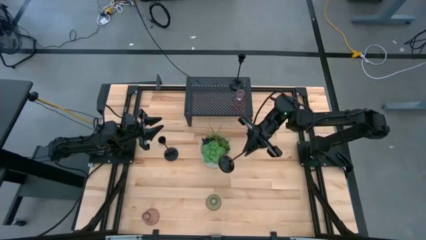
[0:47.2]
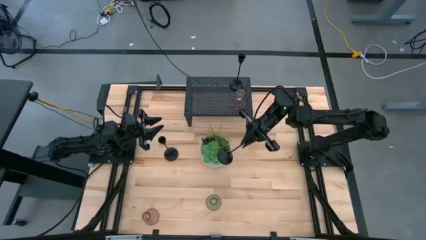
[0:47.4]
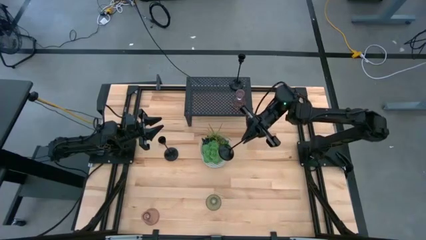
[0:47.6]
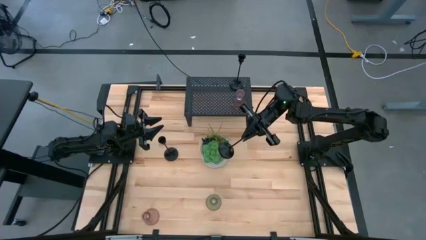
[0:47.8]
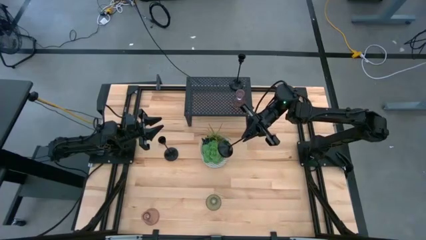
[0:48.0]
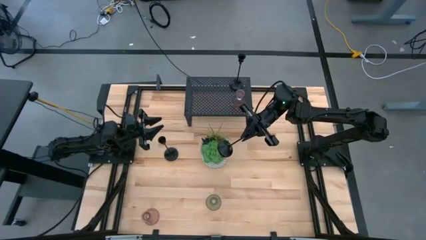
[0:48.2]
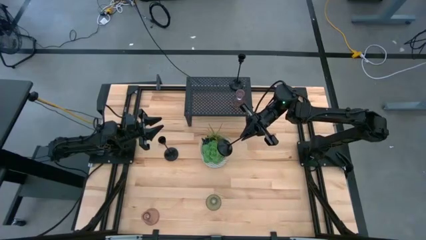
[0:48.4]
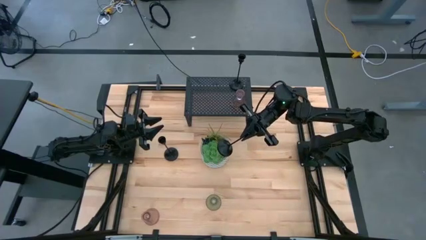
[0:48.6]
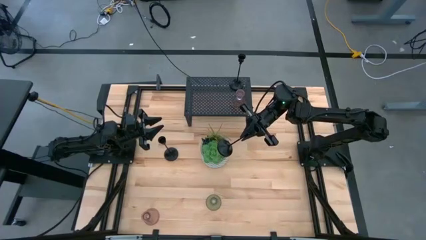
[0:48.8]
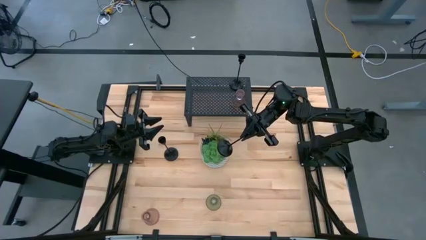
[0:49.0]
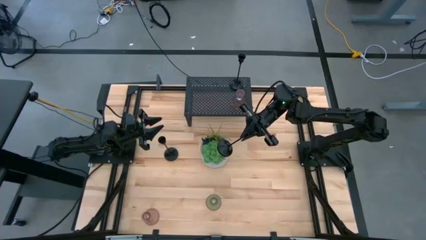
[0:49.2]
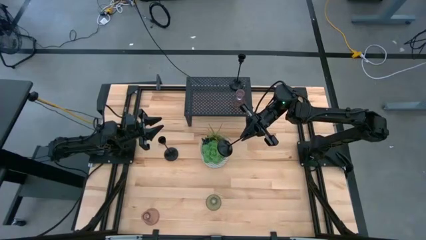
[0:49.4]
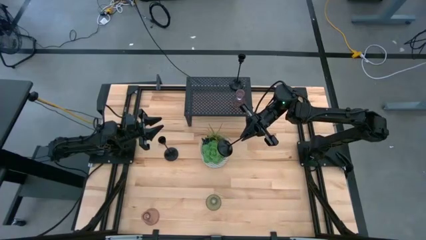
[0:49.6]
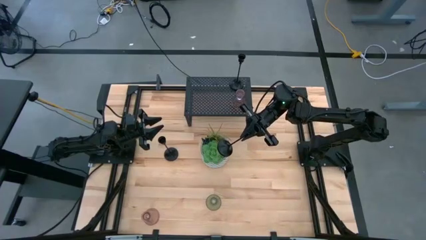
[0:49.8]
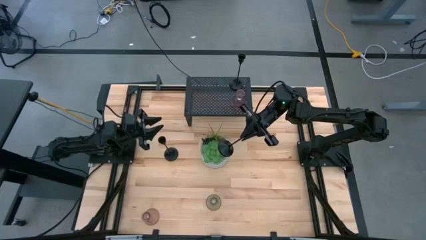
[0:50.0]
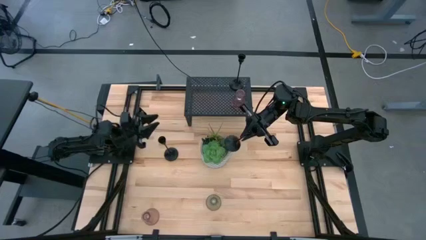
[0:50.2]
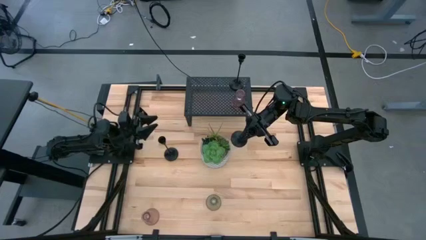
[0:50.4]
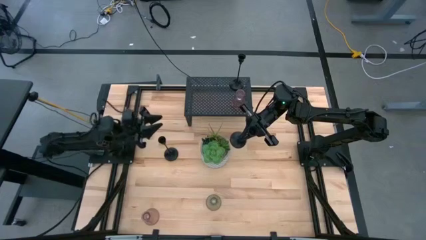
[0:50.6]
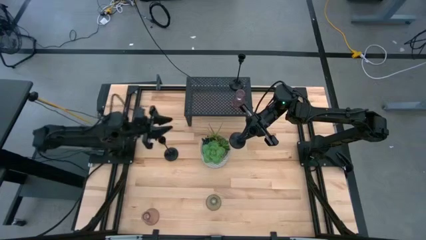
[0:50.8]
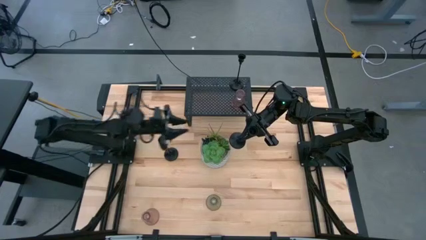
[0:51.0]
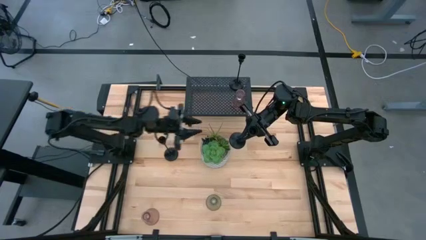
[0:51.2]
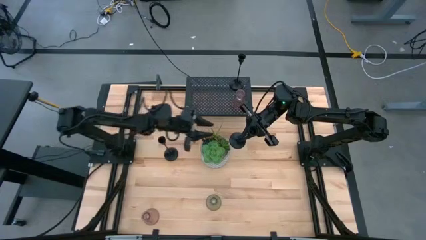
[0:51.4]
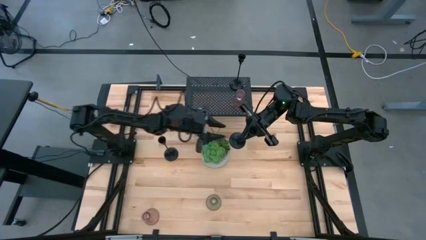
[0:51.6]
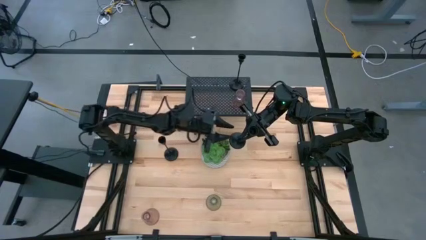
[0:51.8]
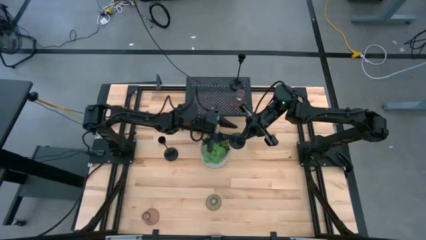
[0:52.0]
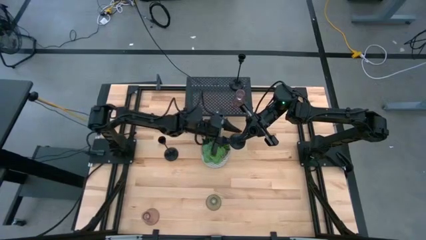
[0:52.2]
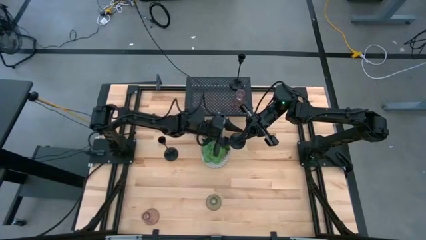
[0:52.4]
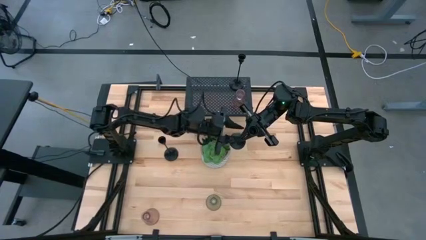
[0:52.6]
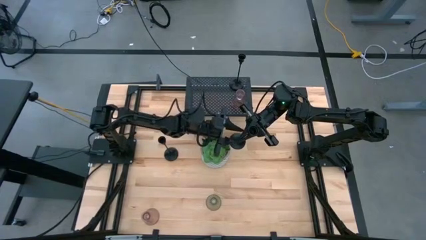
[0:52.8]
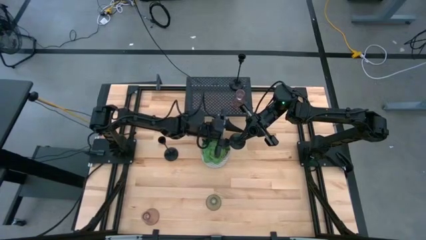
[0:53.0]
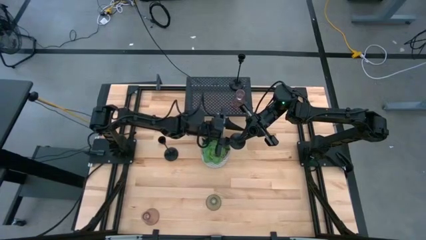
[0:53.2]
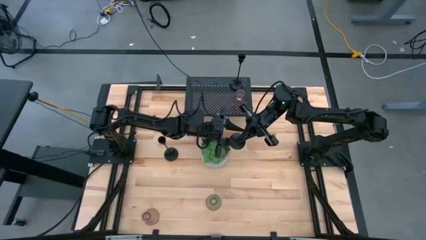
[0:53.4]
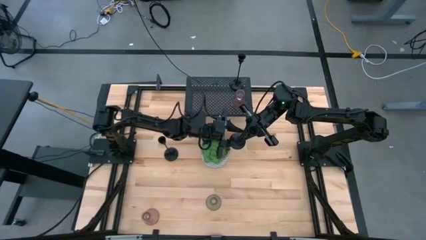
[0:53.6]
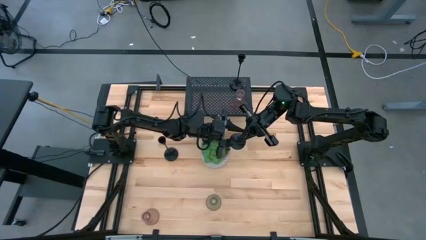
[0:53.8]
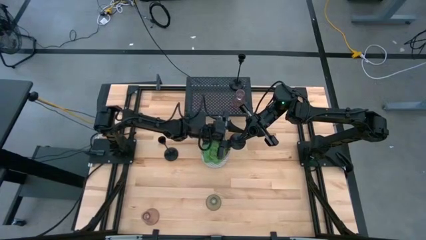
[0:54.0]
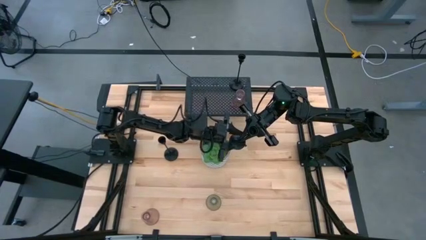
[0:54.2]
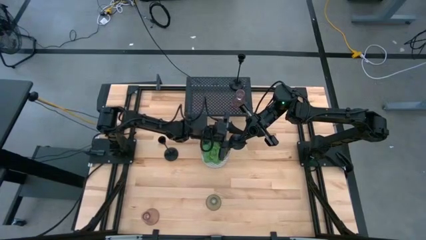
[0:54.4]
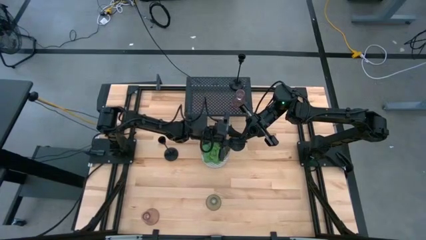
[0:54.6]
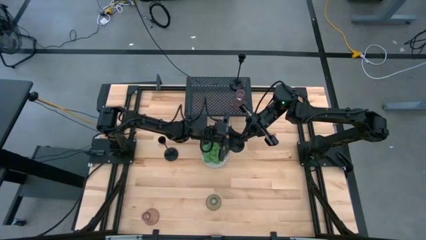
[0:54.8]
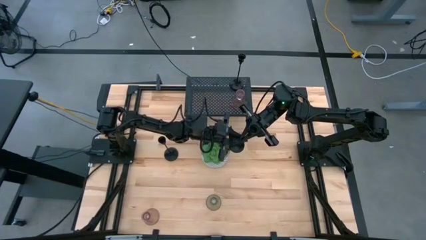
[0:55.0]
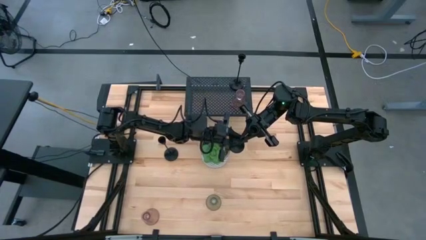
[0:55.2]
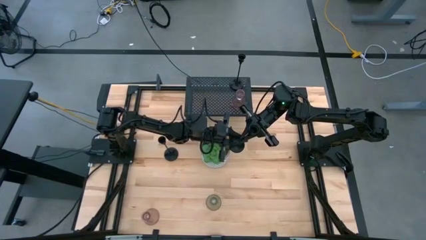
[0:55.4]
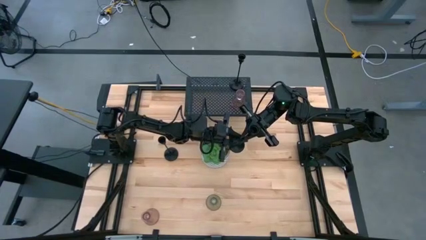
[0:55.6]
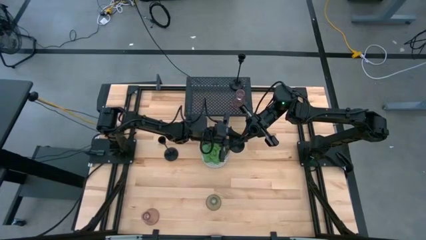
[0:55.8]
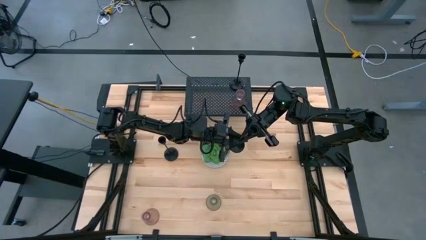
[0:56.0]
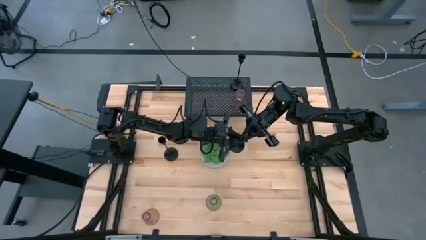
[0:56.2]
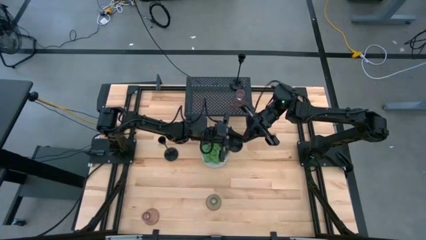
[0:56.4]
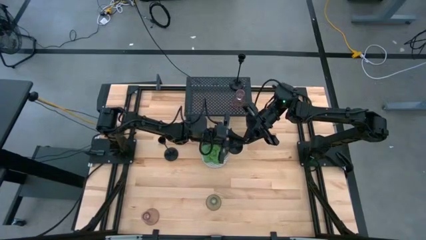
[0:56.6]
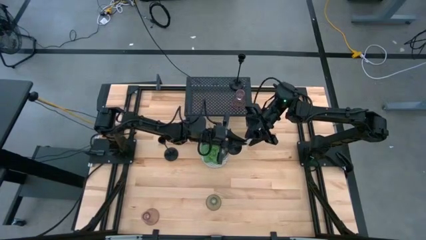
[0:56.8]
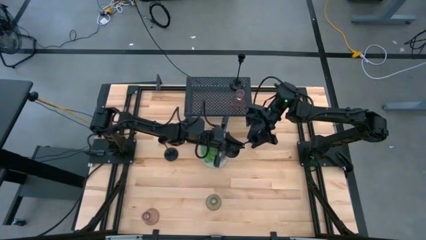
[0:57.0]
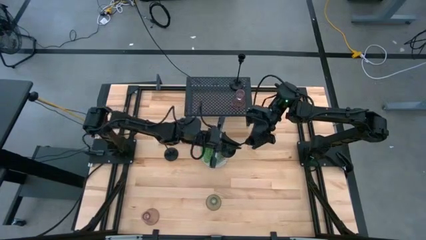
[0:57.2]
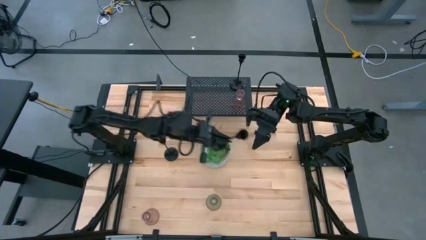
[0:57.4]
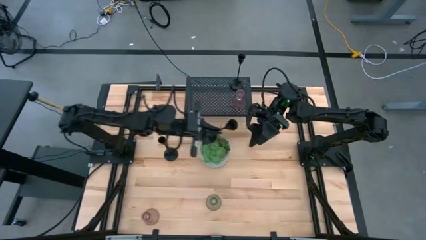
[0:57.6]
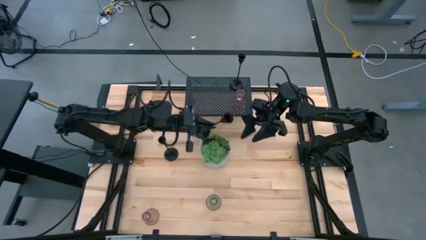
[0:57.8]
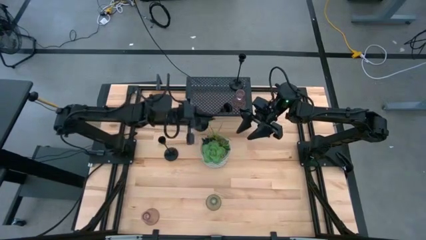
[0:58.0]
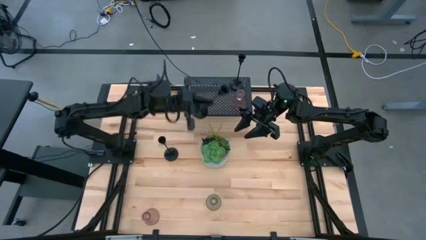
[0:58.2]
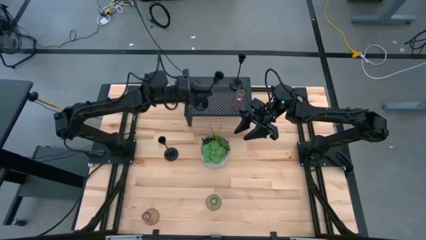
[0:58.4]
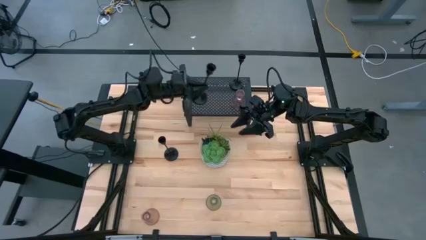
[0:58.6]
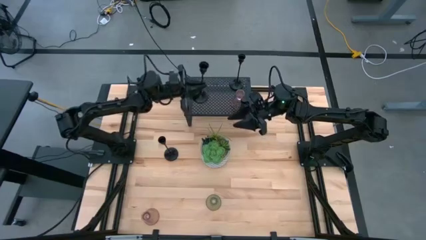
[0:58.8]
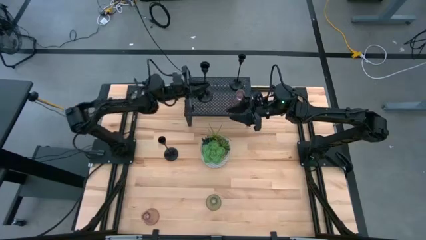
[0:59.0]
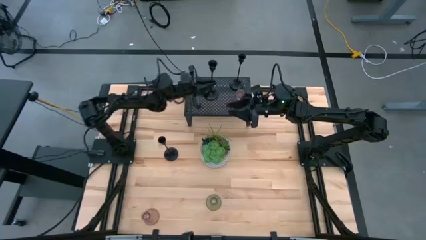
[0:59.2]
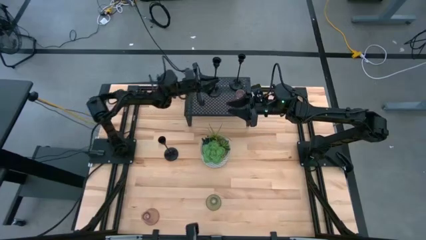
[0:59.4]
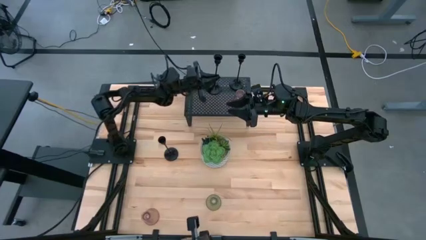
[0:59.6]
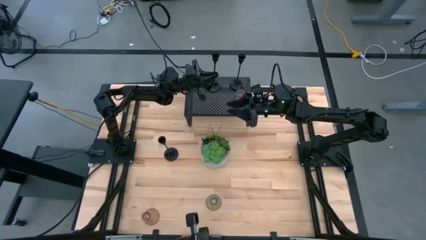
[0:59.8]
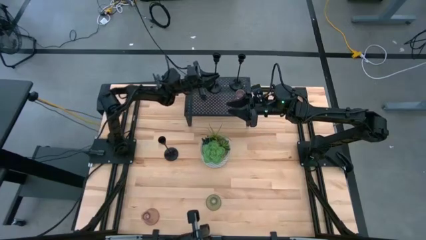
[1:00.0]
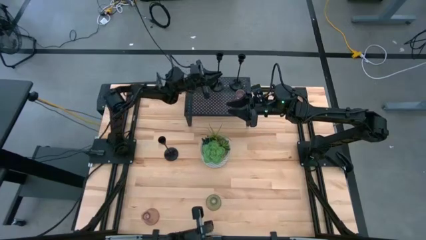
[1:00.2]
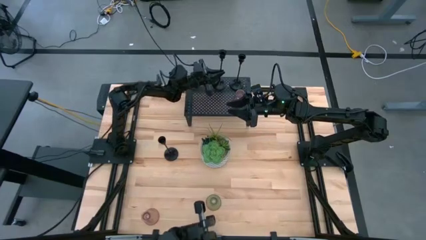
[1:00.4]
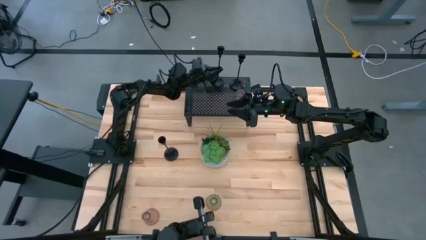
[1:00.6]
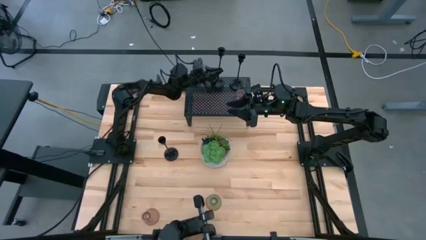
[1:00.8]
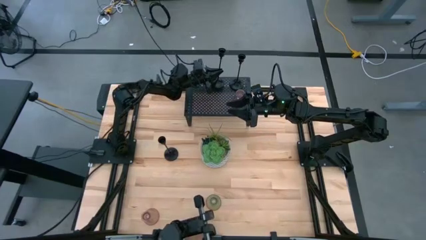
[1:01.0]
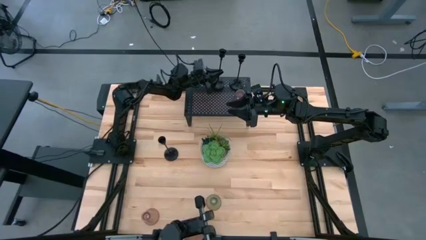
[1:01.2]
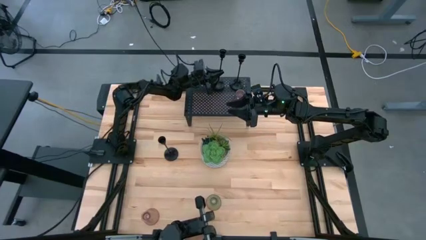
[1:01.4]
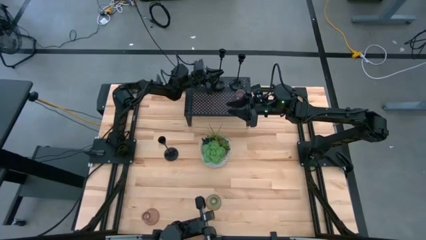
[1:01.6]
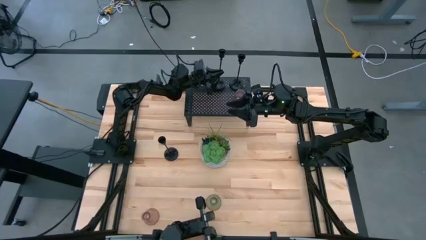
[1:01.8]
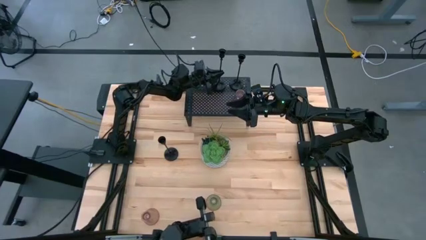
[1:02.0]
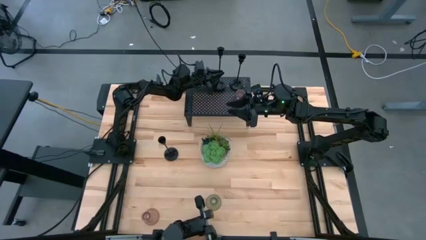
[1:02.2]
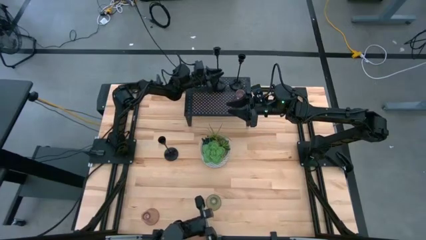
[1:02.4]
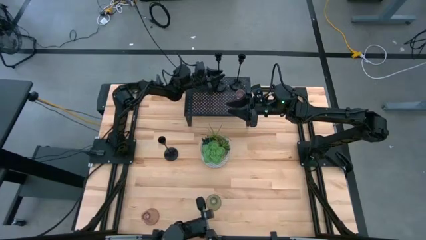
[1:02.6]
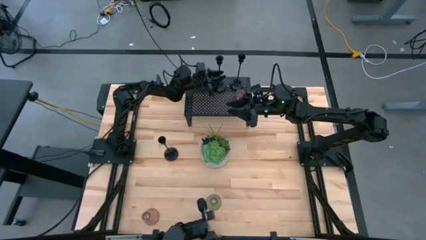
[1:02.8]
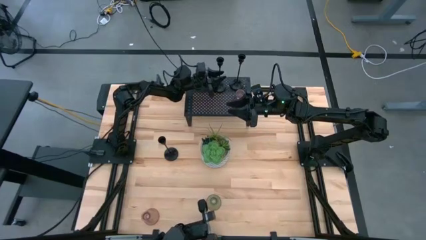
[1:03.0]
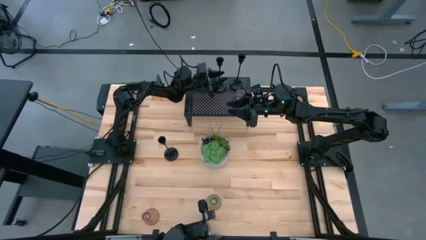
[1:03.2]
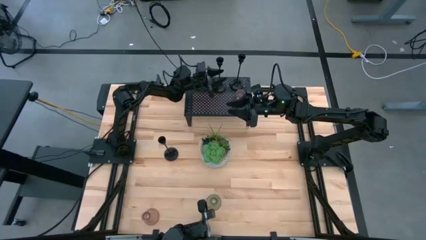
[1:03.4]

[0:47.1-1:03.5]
Task: Pick & Place candle stick holders
Put the bottom black candle holder on the shelf
